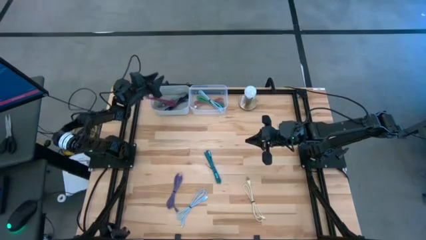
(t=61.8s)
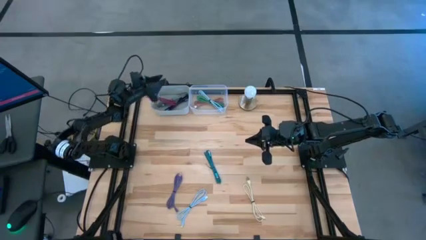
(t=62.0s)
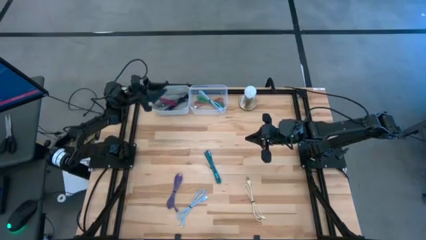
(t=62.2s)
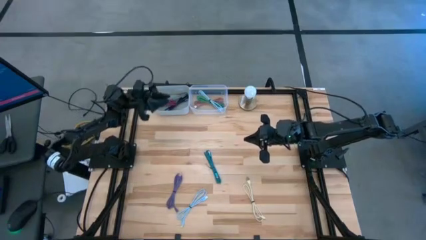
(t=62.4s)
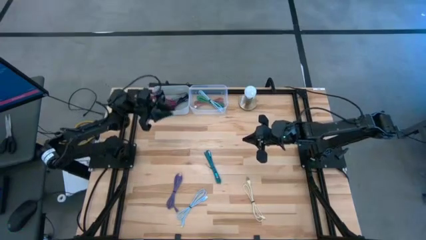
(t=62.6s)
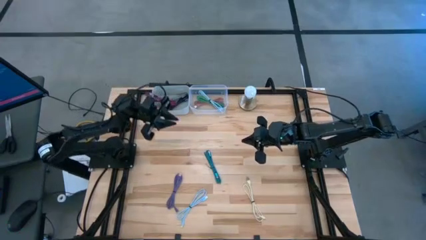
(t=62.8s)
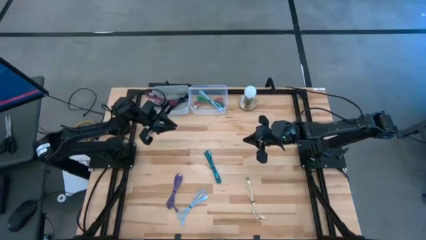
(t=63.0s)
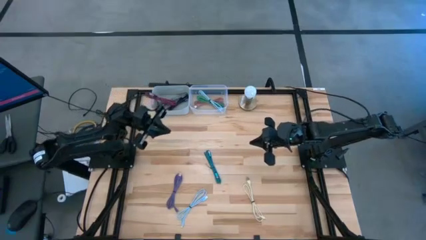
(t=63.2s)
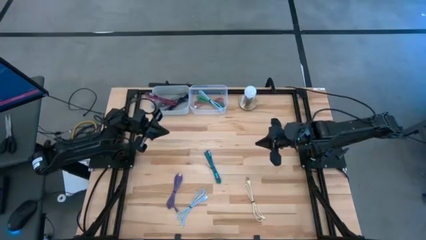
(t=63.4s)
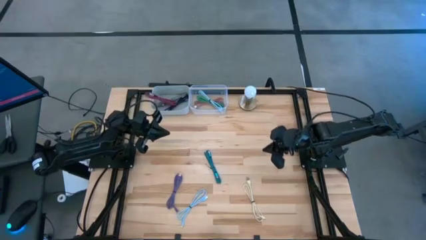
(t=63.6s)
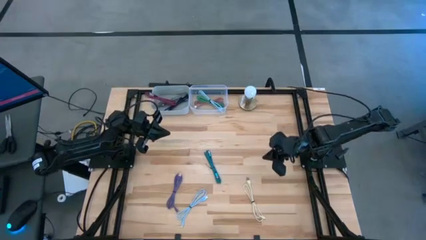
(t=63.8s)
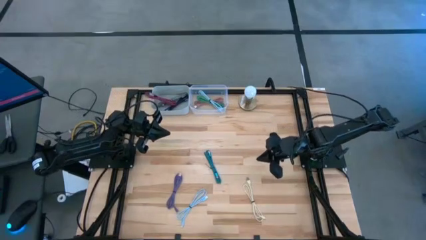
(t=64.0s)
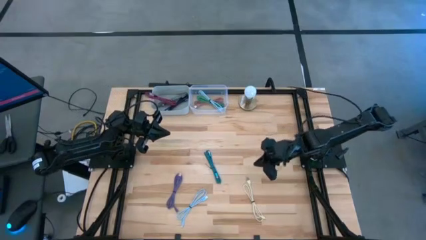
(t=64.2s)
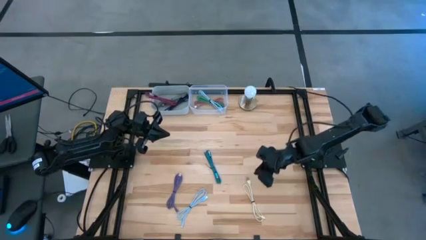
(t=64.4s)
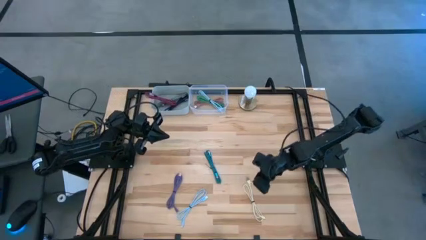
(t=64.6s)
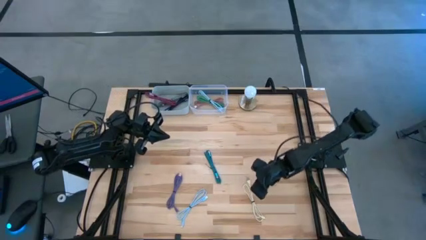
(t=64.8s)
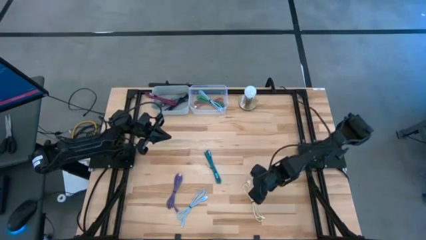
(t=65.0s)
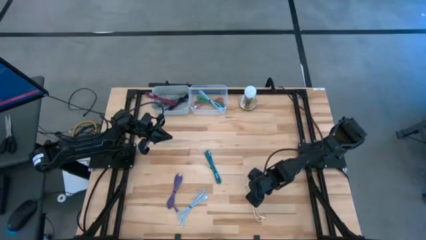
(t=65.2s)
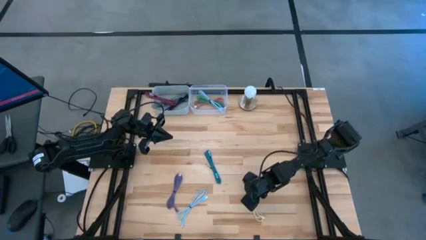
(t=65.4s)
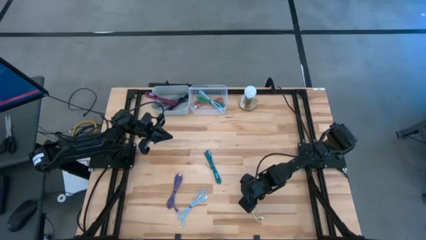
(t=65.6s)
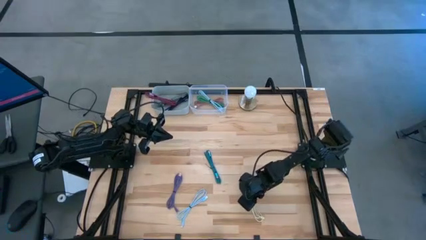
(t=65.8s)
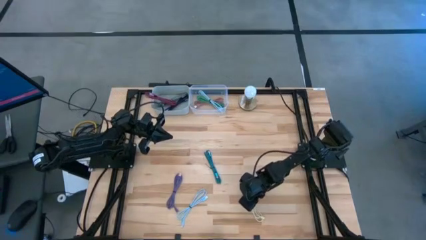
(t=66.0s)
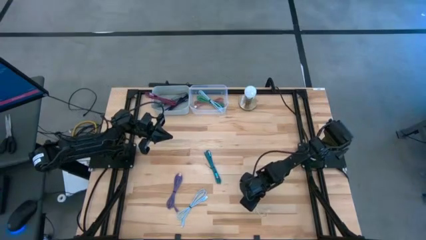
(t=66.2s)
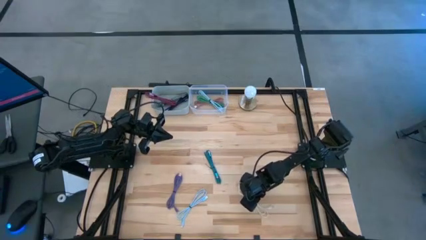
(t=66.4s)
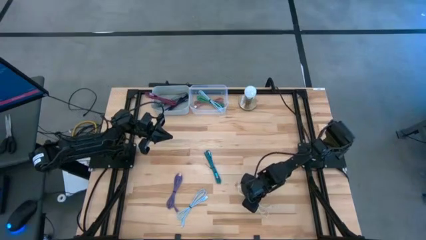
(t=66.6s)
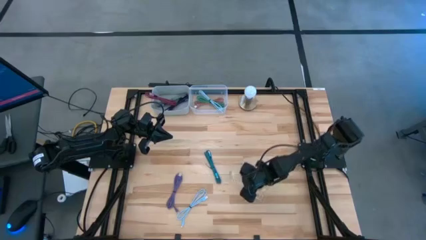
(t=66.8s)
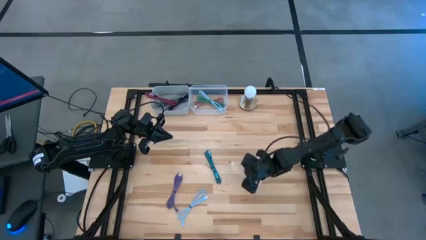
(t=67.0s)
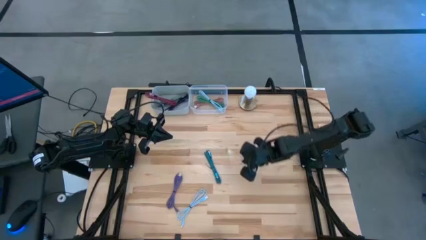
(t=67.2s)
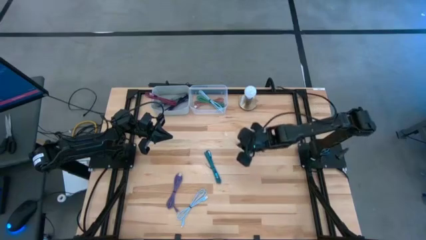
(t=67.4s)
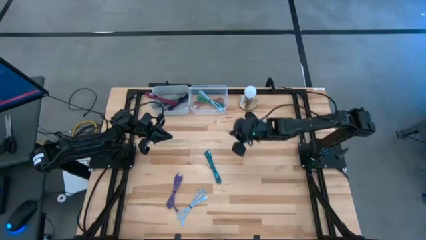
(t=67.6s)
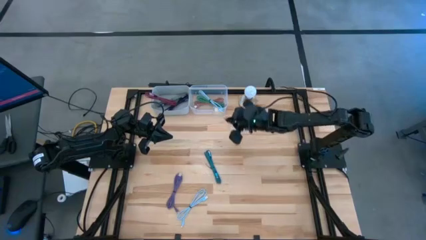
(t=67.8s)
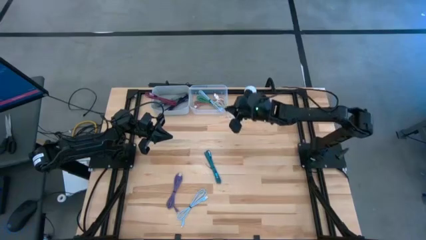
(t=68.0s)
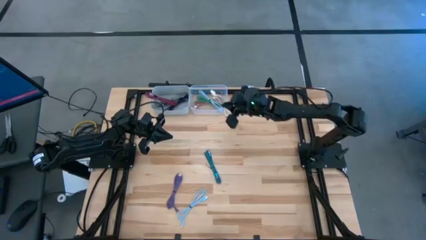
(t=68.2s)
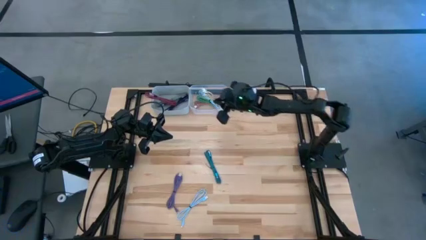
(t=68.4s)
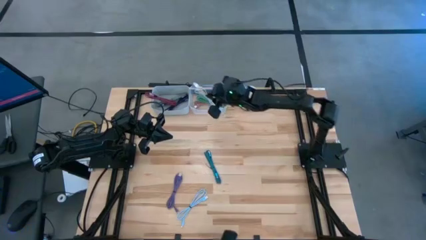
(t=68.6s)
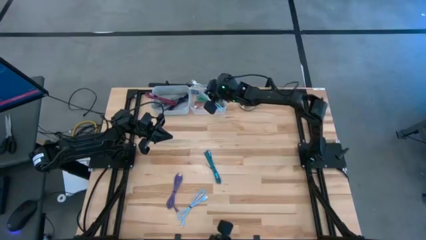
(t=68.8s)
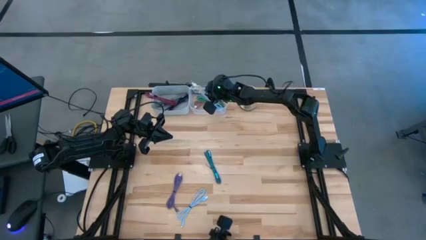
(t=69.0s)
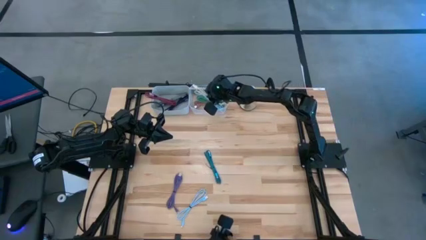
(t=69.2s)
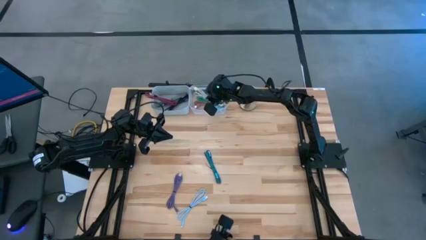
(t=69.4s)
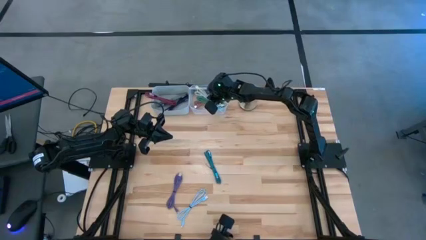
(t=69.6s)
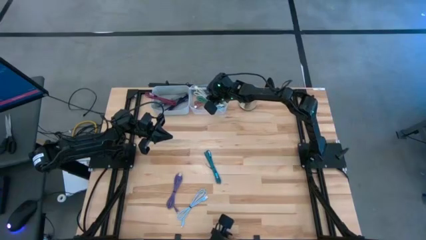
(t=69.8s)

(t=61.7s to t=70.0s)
Task: Pick & Place USB Port
Put the white USB cable into the transparent bin

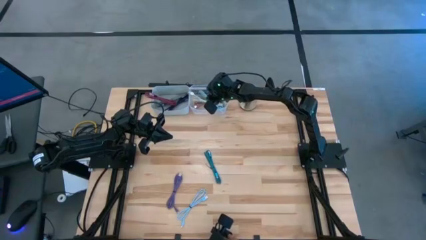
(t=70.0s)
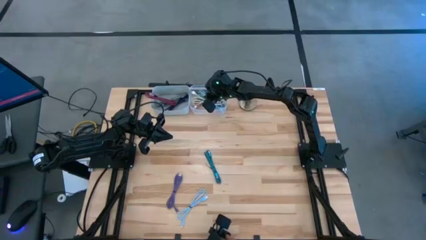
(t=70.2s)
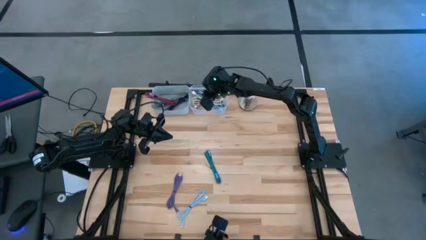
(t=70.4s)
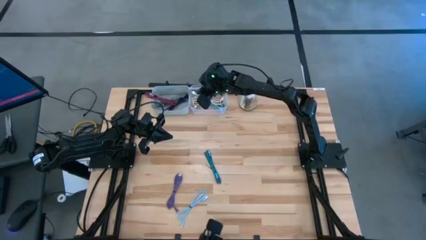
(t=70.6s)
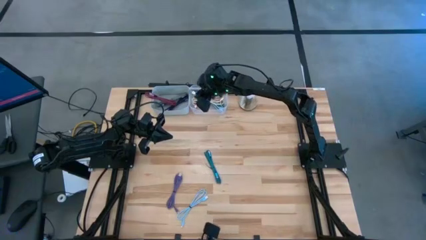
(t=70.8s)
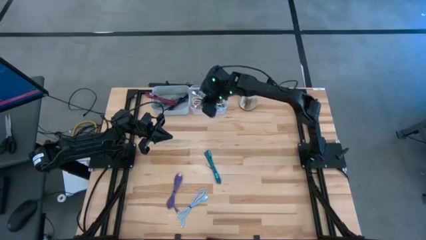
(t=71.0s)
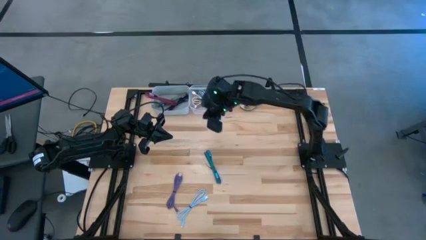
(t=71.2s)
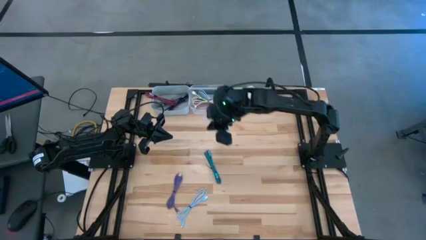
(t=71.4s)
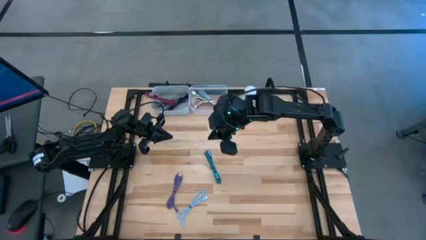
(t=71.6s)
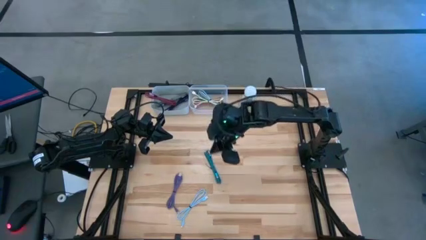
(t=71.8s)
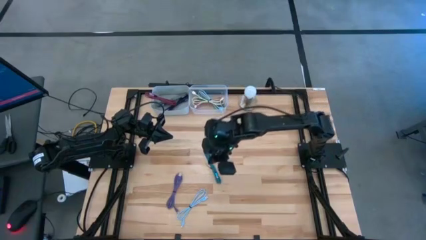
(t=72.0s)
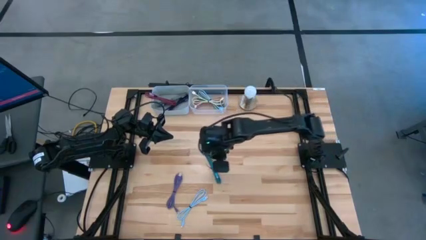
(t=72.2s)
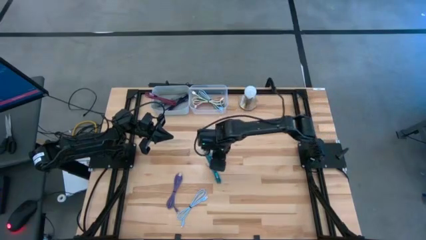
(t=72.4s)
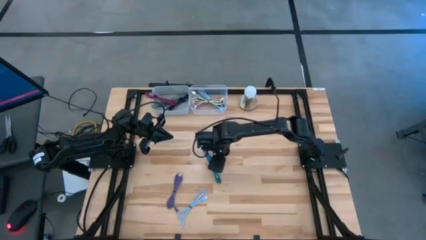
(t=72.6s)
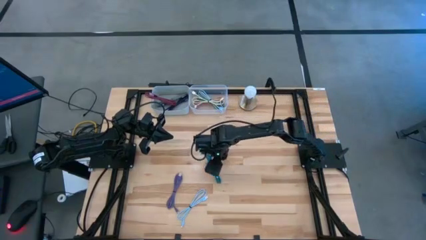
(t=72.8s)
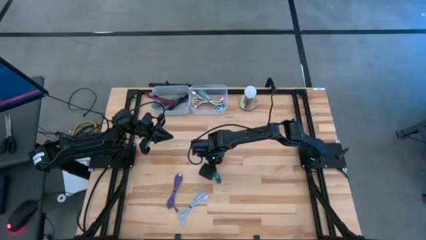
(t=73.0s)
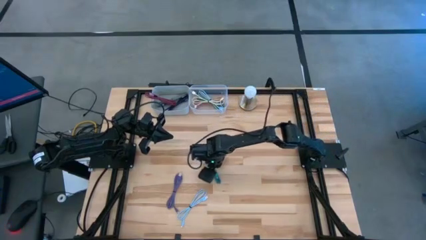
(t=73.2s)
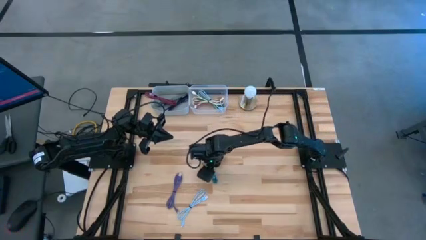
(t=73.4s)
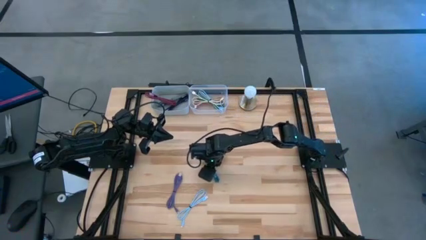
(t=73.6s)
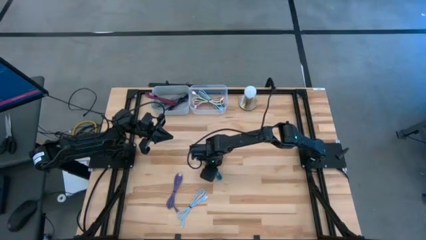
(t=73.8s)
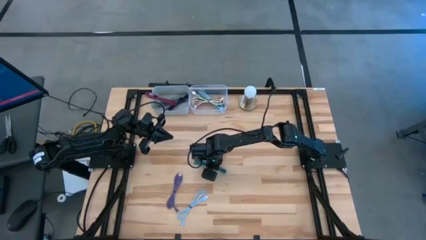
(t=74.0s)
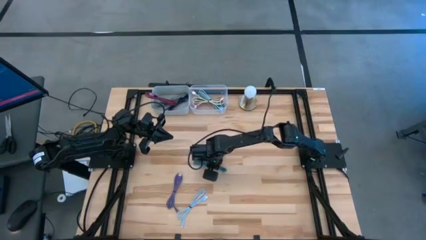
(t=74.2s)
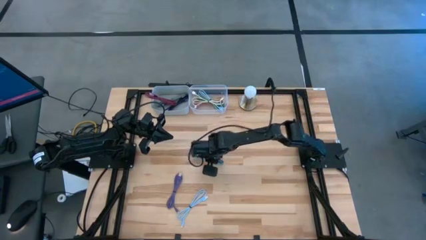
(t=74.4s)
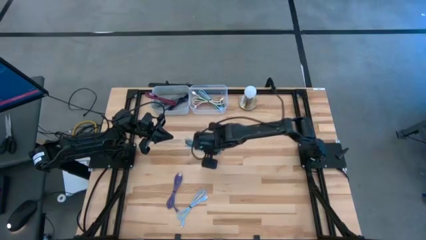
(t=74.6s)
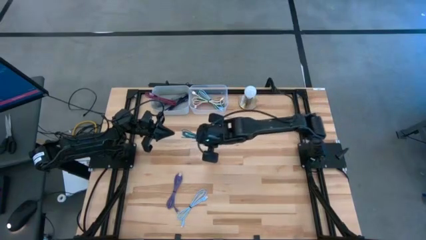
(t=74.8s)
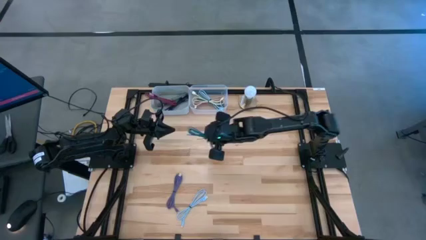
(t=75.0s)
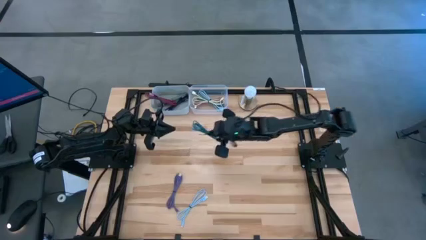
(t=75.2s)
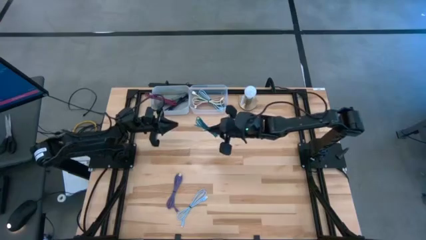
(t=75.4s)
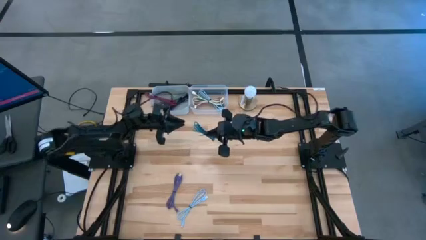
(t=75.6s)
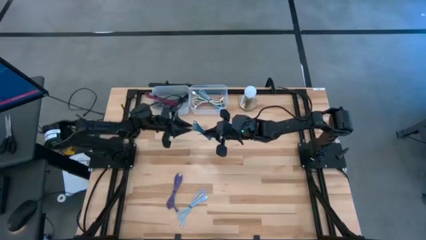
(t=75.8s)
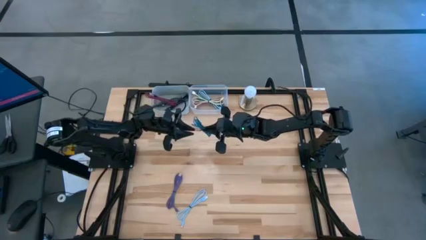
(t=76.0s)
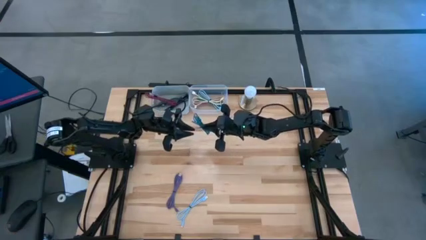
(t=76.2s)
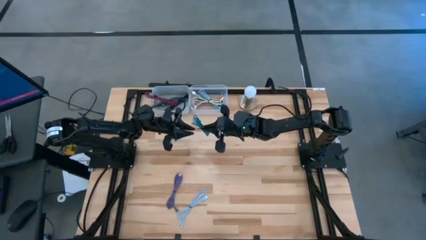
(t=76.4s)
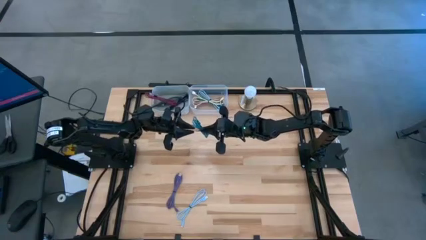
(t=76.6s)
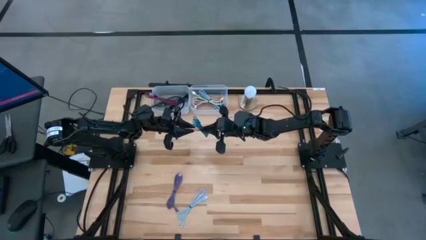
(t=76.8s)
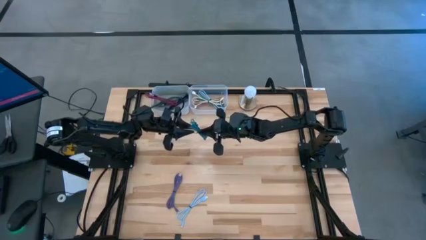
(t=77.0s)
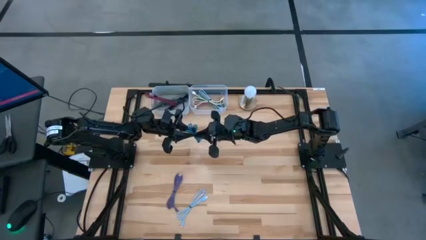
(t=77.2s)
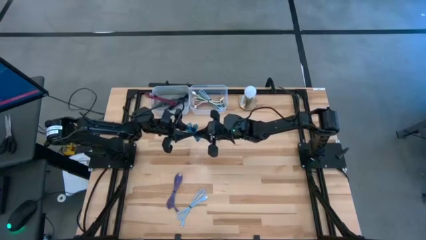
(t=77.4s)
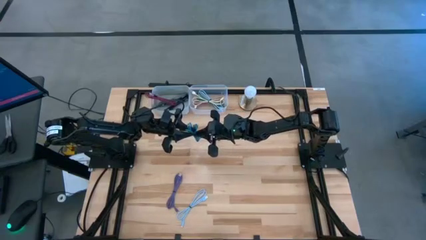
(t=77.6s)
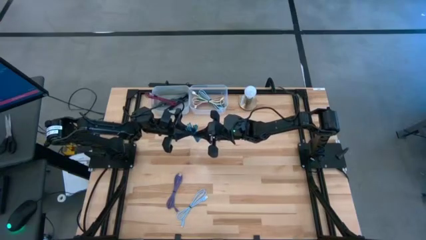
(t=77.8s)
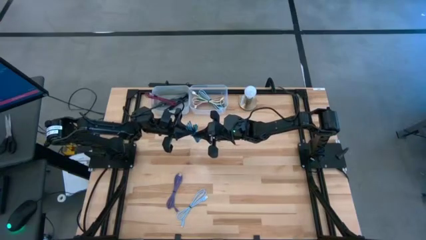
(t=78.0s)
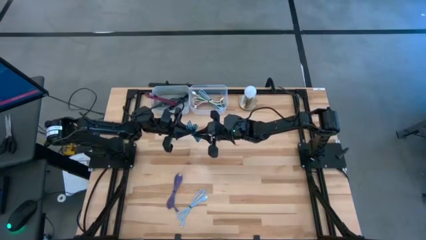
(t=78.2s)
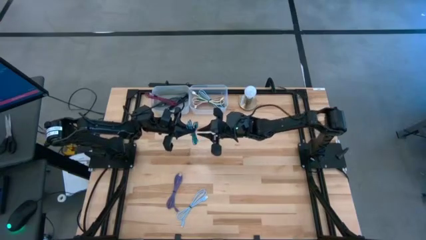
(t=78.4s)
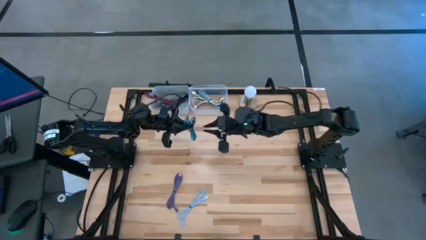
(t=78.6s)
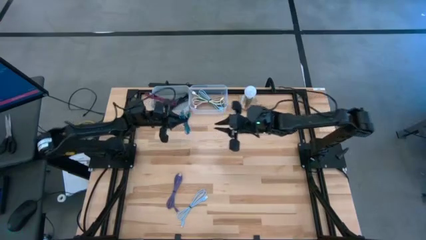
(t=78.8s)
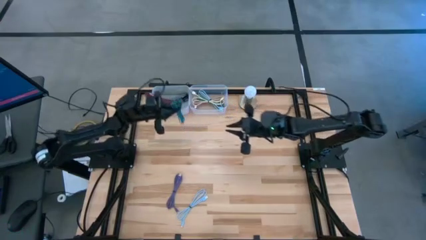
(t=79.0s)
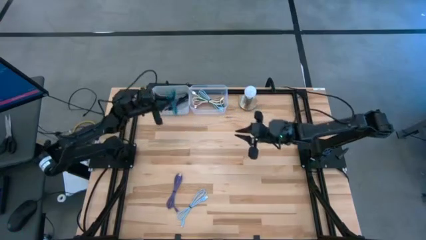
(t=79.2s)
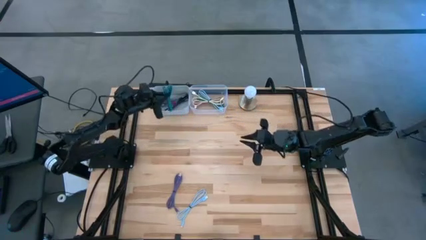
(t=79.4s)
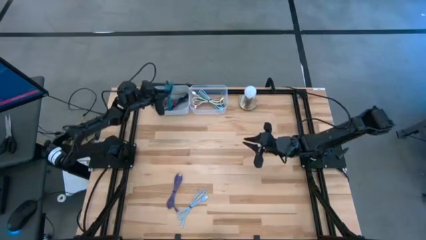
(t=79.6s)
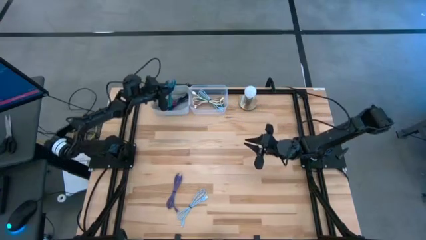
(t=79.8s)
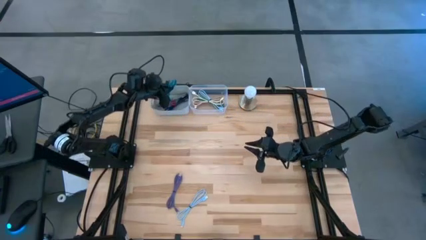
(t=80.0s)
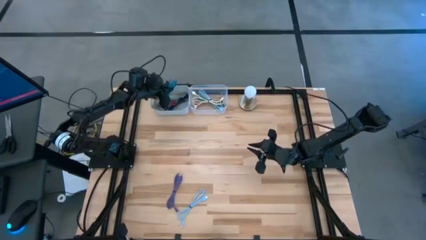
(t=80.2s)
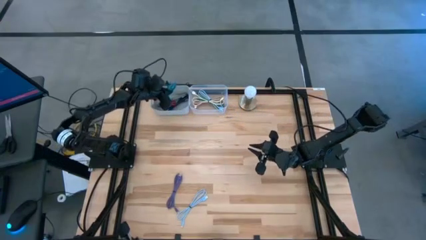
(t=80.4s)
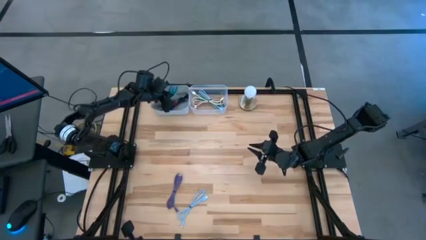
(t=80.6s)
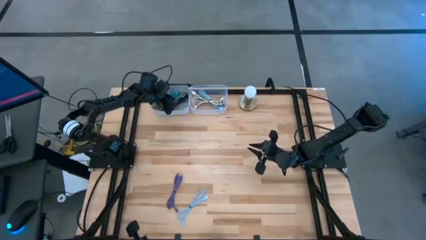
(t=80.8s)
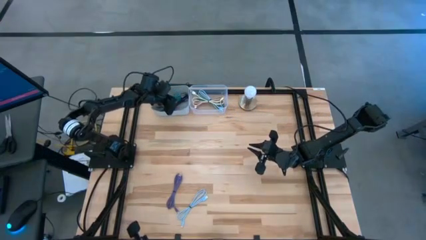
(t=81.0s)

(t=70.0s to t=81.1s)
Put the black and blue USB cable into the gray bin
